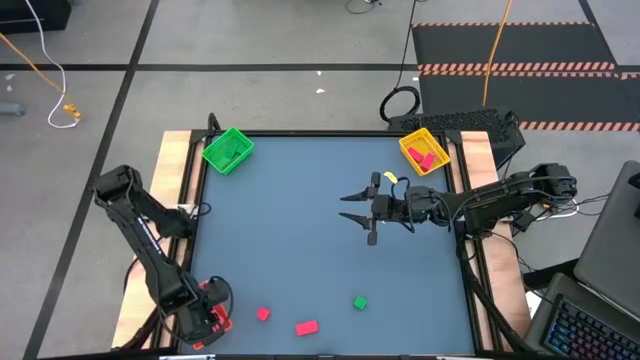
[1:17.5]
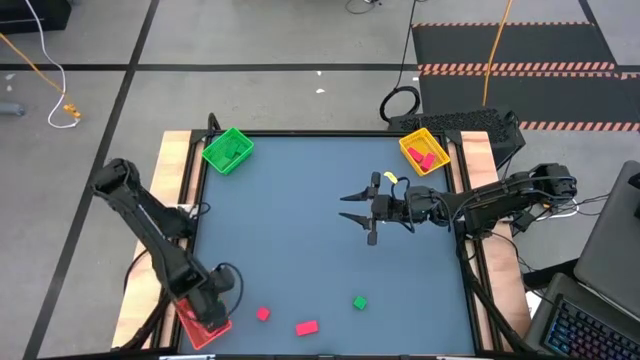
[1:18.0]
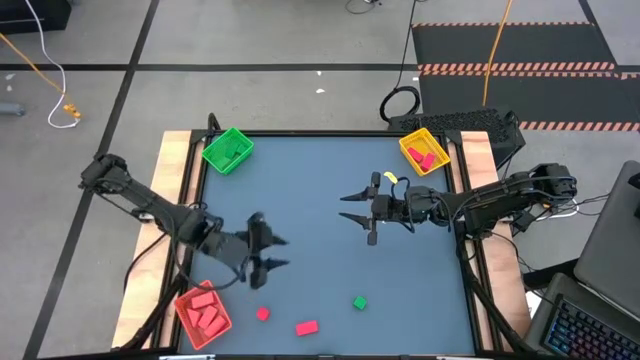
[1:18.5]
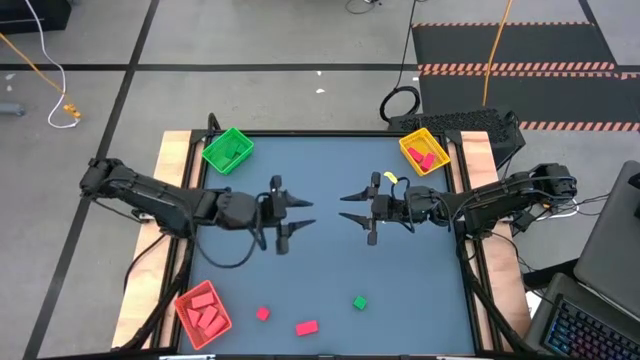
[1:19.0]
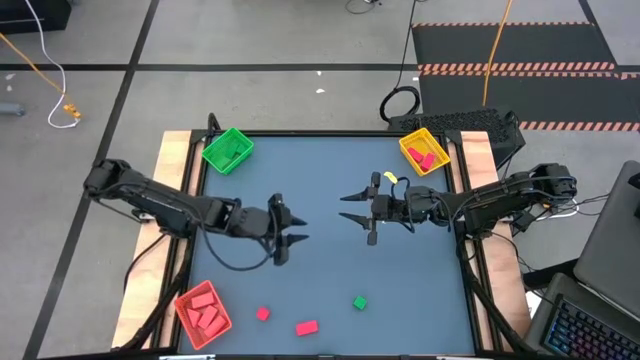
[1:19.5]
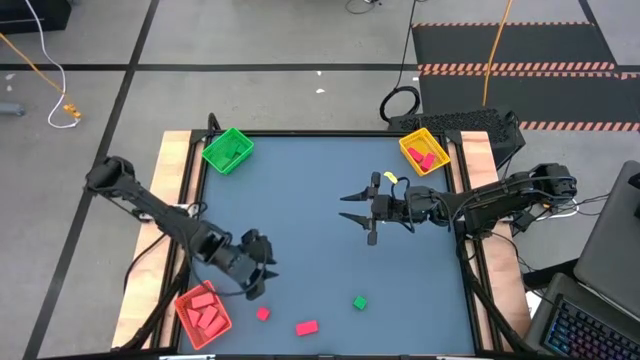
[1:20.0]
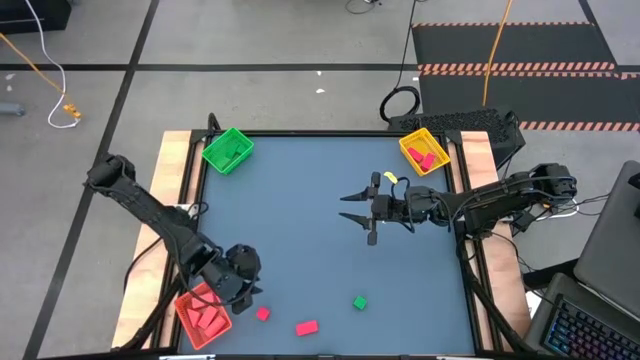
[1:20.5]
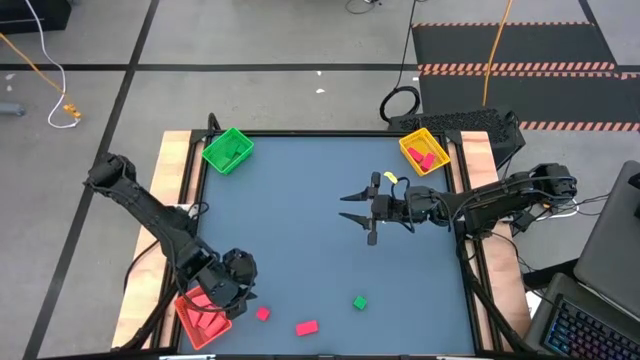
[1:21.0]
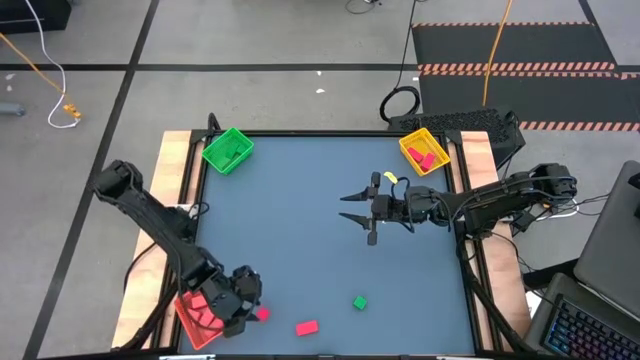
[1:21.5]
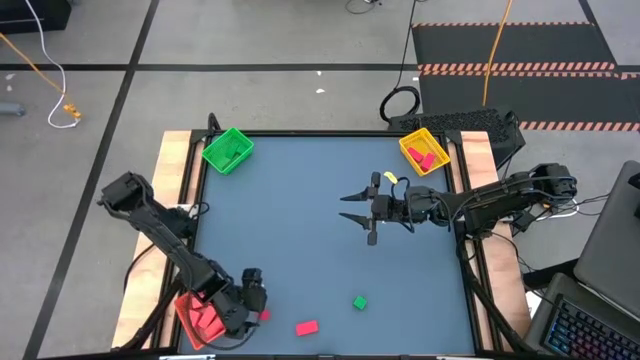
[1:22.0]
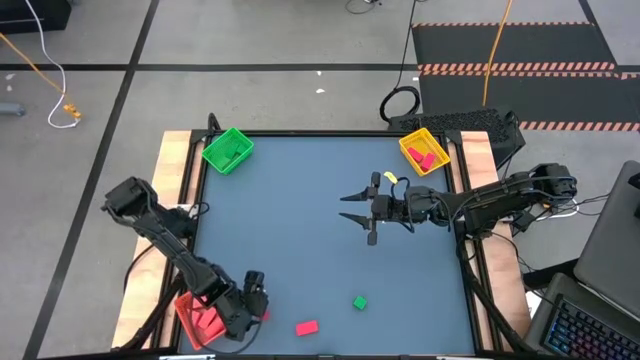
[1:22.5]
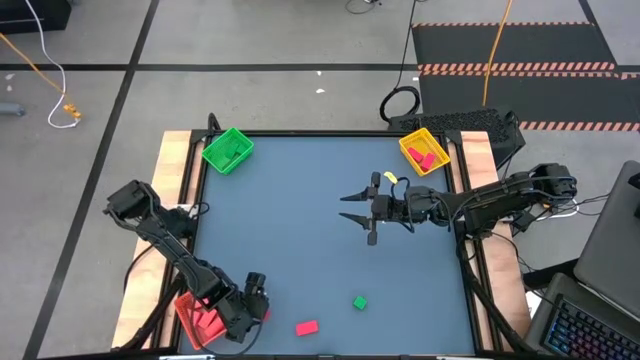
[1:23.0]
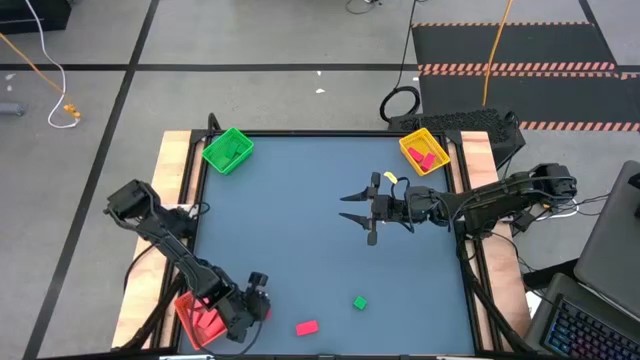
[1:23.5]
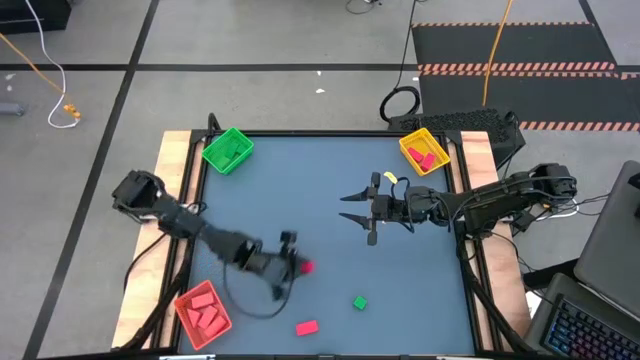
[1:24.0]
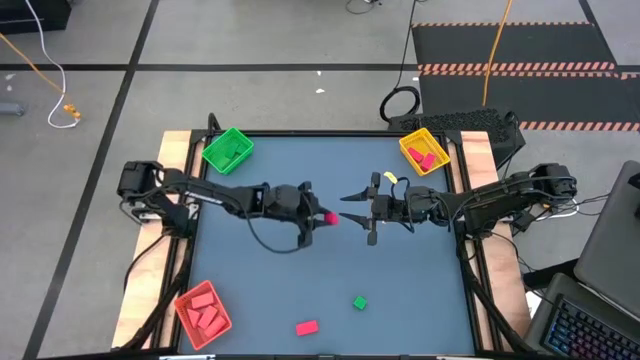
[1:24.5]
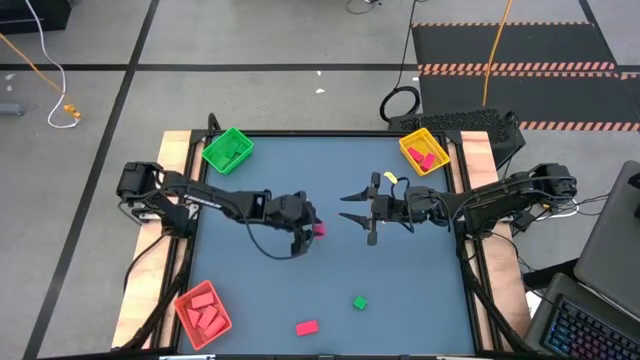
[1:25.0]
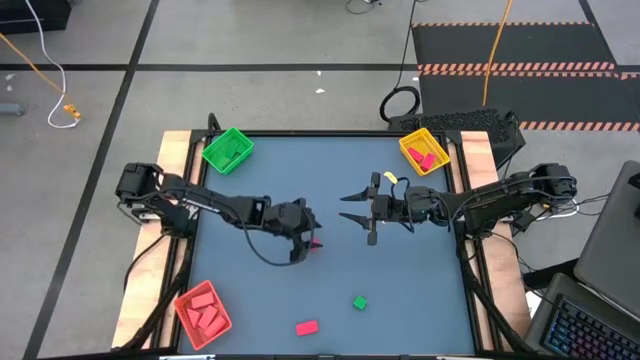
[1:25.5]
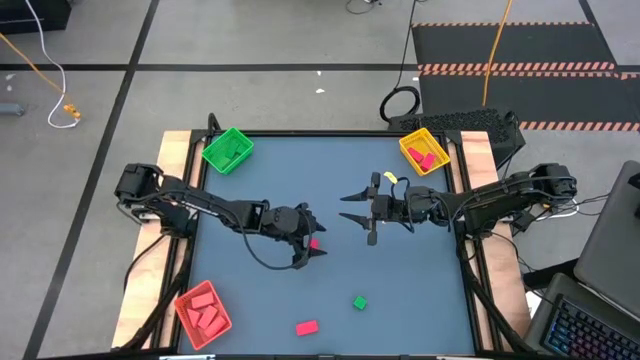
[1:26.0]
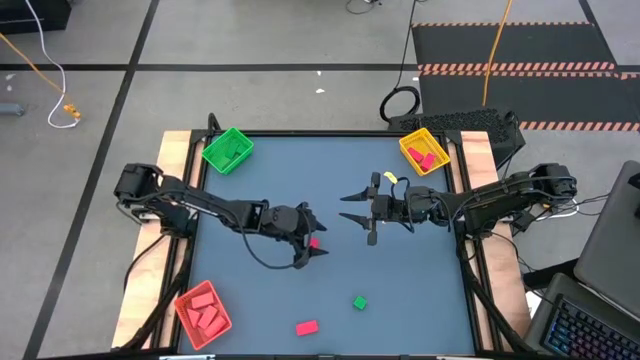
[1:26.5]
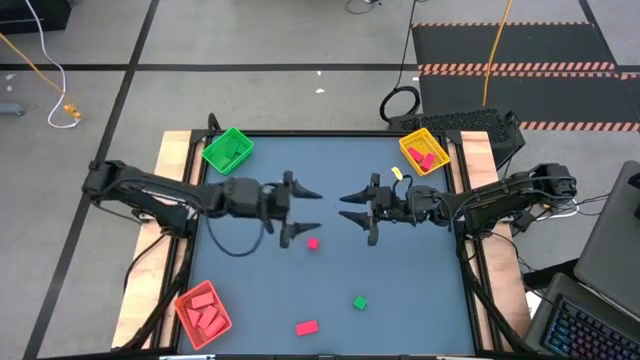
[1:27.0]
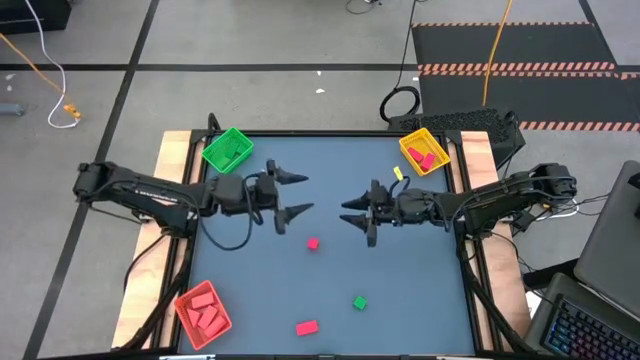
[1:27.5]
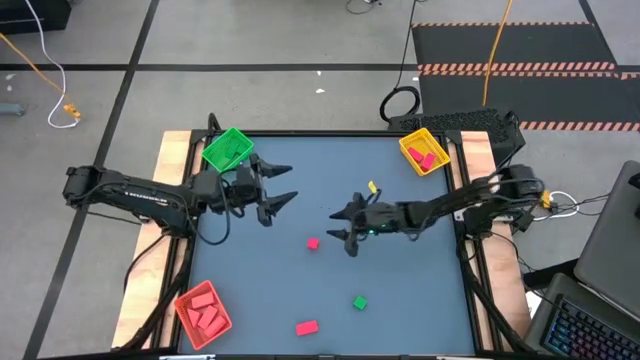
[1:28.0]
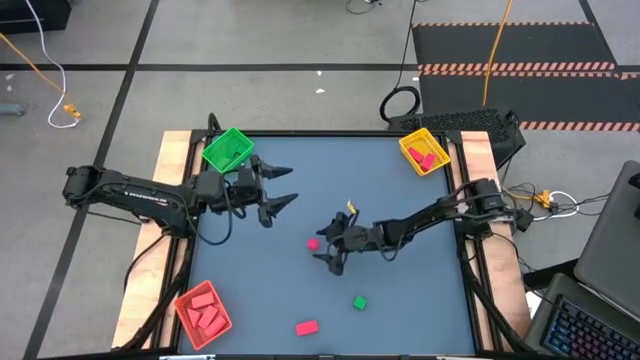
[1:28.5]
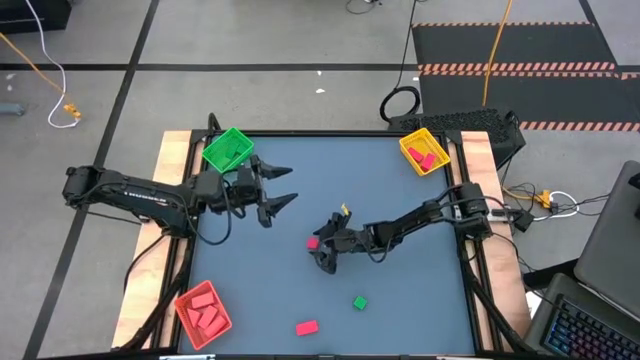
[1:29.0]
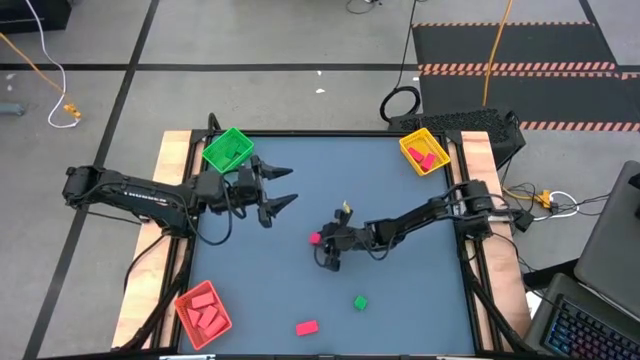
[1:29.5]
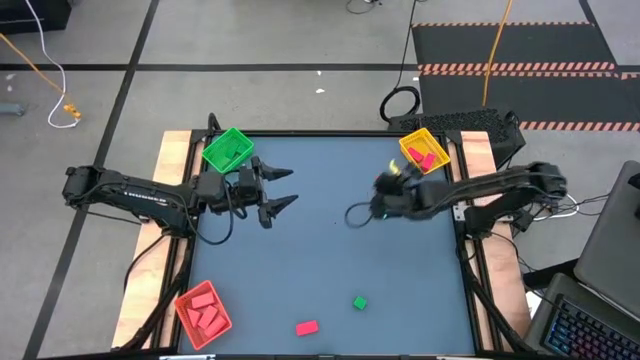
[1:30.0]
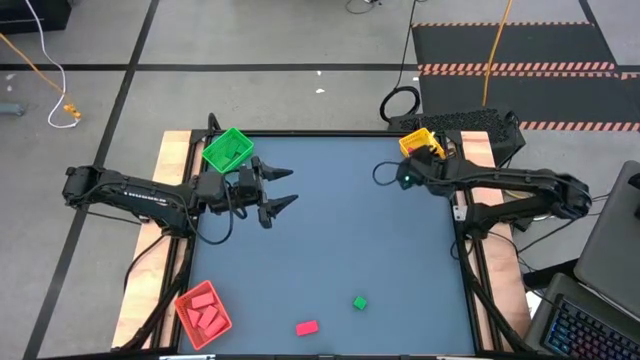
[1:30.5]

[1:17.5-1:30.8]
Task: Sort & place blocks by color
Put the red block into the yellow bin

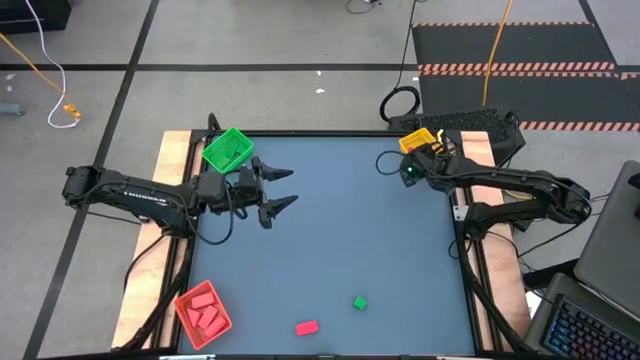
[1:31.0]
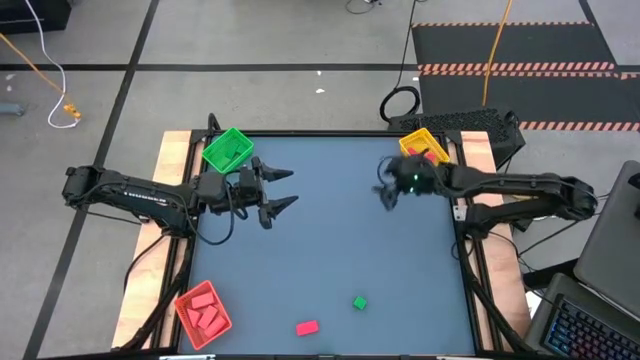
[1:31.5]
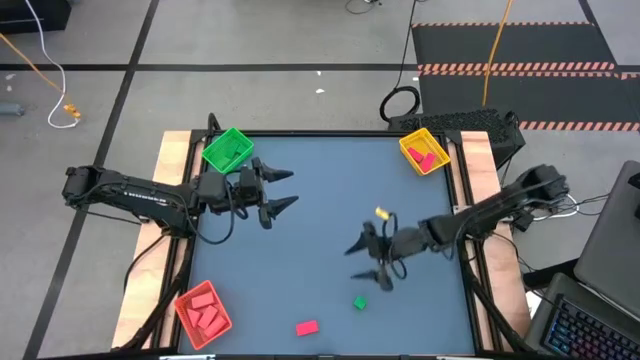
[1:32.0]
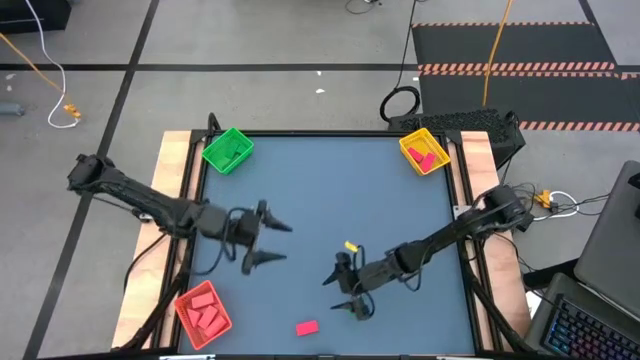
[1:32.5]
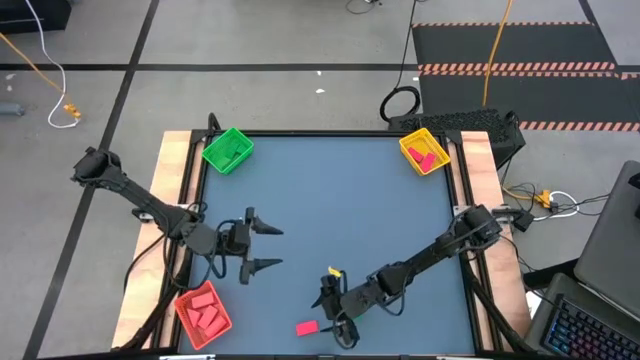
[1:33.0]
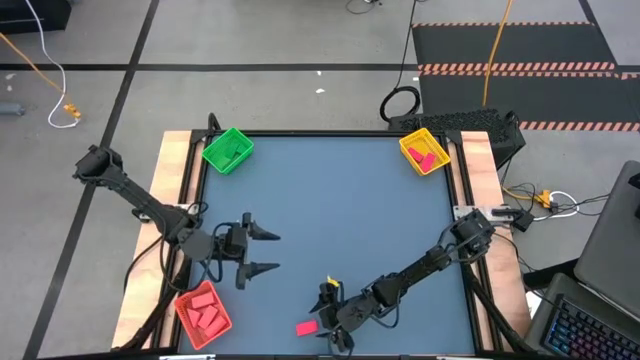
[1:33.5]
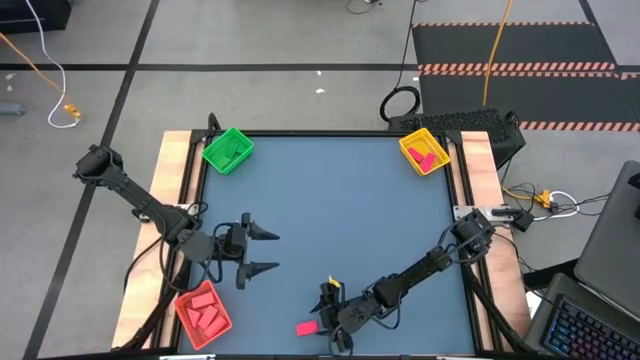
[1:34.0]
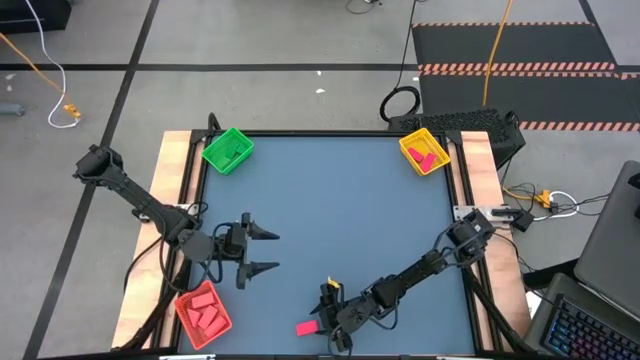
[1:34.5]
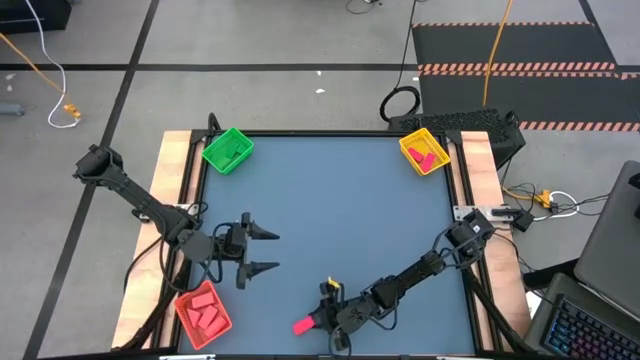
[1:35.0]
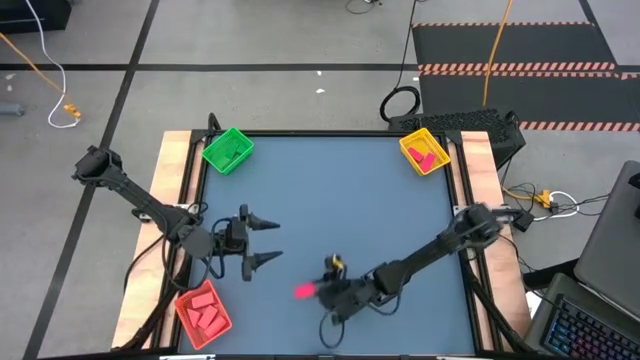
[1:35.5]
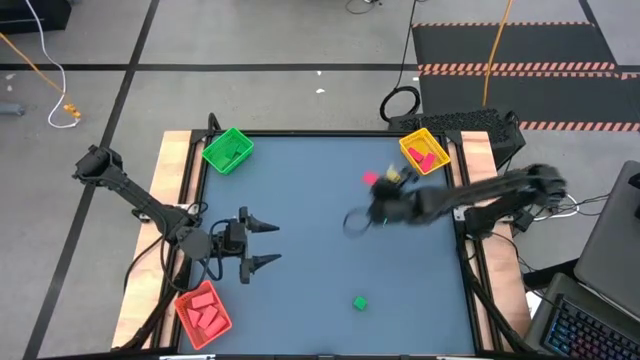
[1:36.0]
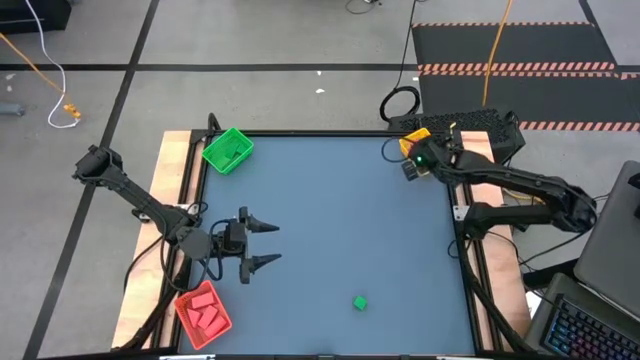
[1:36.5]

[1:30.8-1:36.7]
Put the red block into the yellow bin

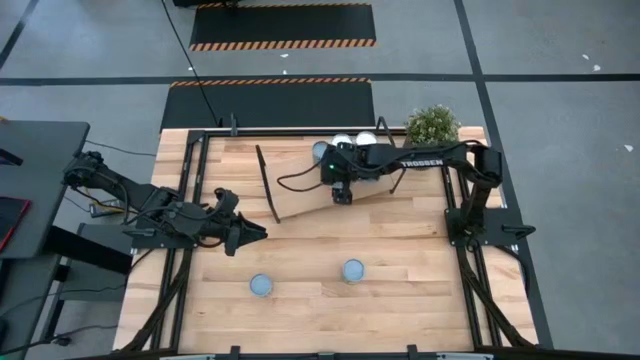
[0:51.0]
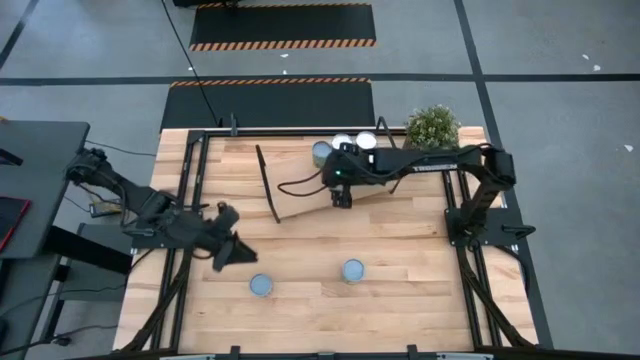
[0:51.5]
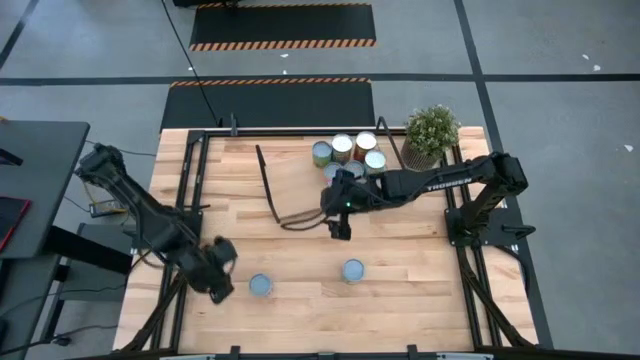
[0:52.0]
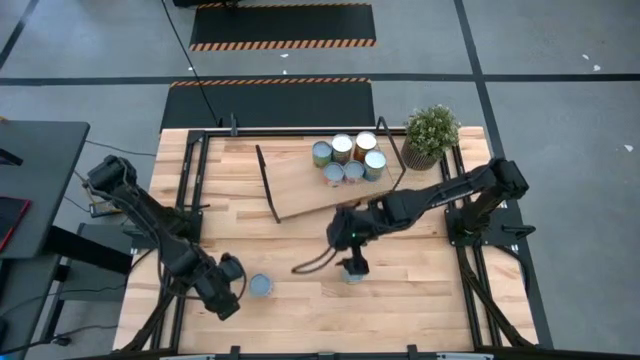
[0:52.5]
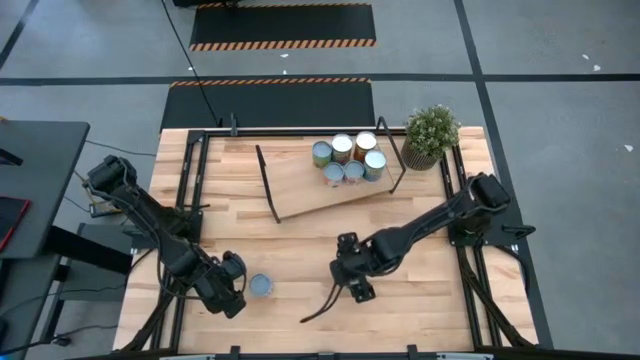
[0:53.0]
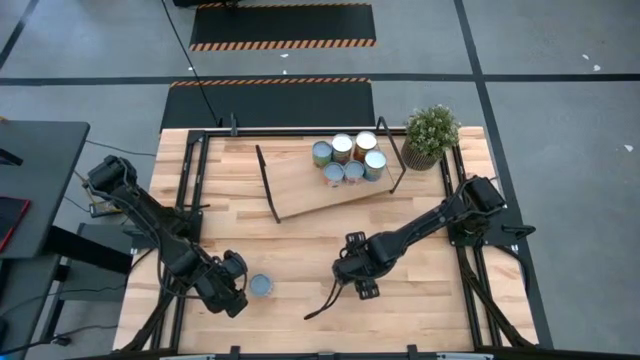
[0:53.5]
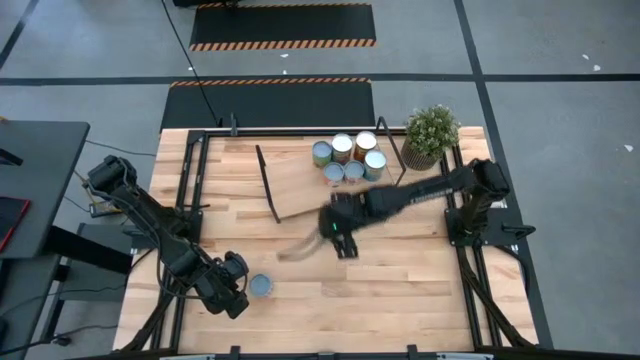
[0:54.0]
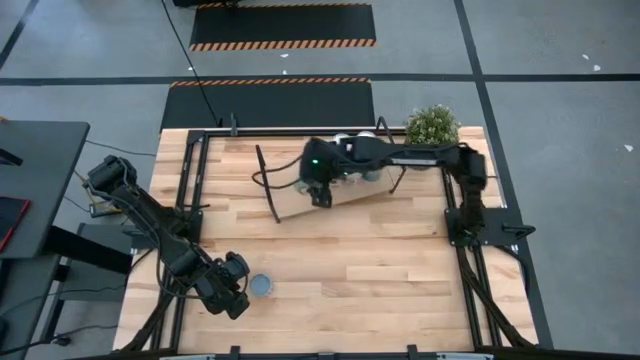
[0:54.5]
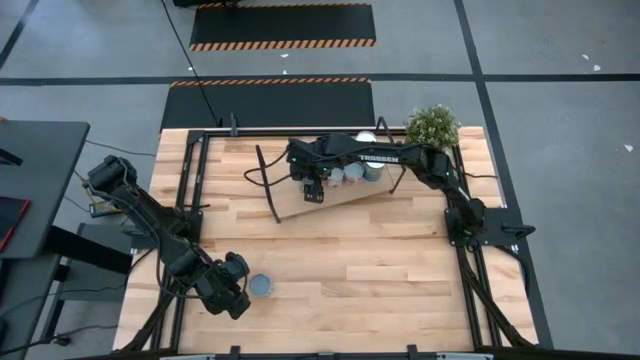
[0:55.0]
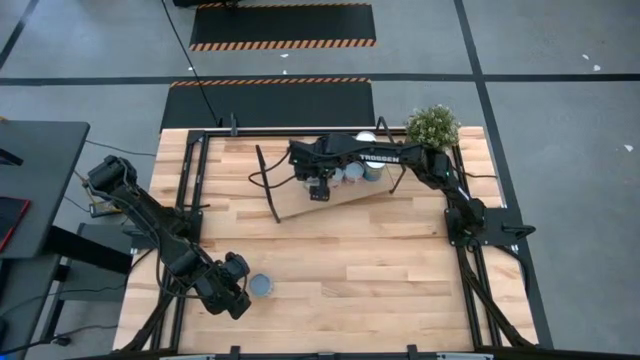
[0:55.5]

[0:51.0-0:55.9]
Task: Pick and place cans onto a shelf
Put the canned chicken soup on the shelf
